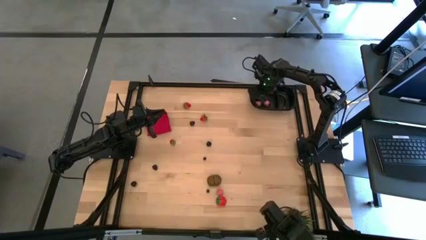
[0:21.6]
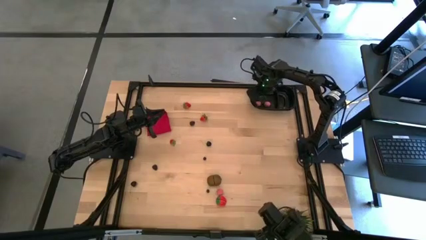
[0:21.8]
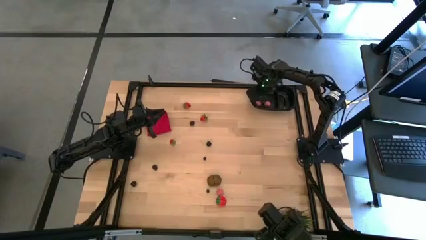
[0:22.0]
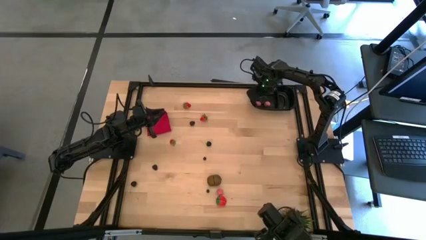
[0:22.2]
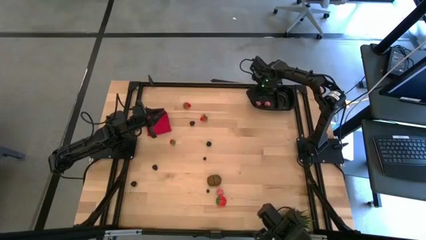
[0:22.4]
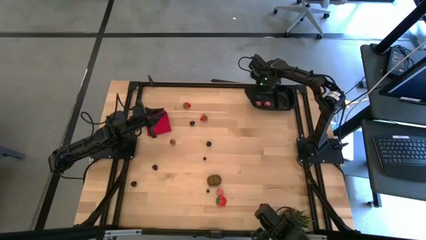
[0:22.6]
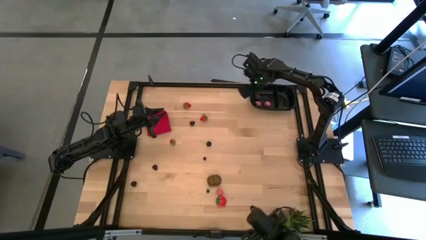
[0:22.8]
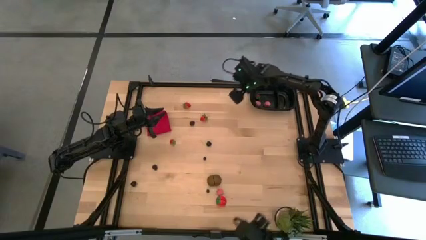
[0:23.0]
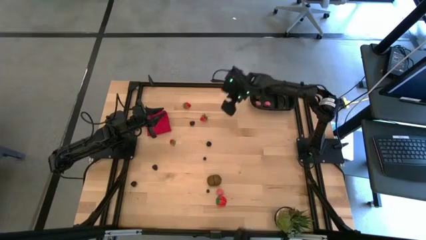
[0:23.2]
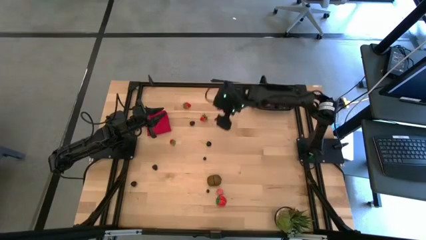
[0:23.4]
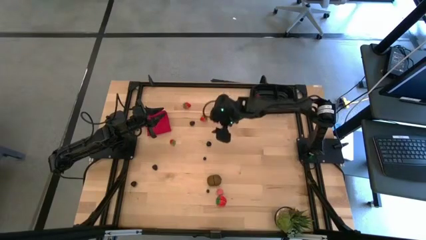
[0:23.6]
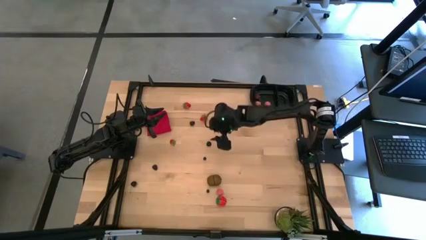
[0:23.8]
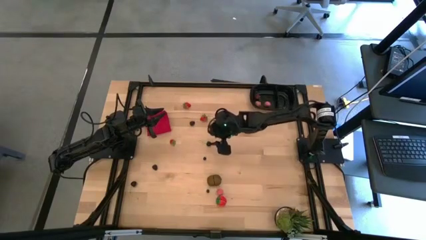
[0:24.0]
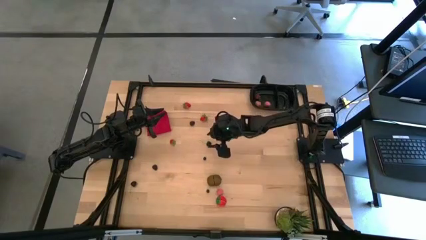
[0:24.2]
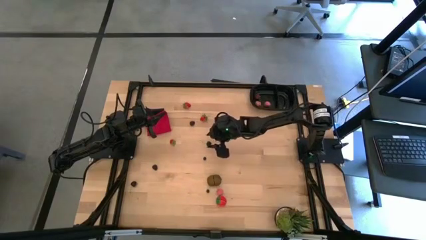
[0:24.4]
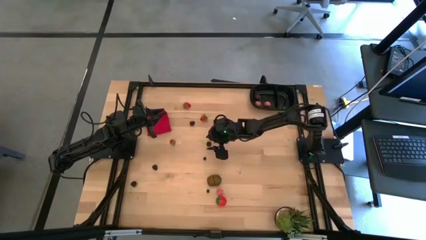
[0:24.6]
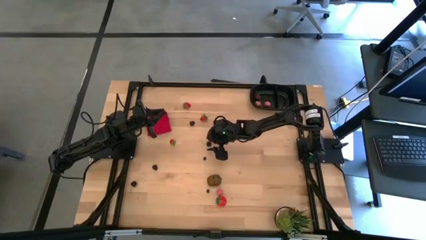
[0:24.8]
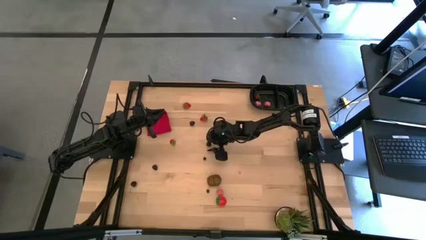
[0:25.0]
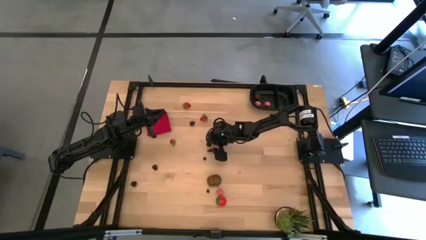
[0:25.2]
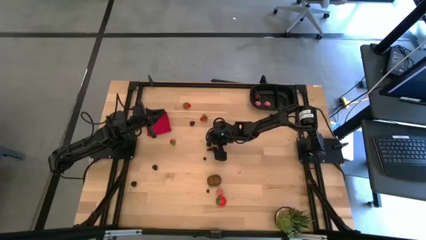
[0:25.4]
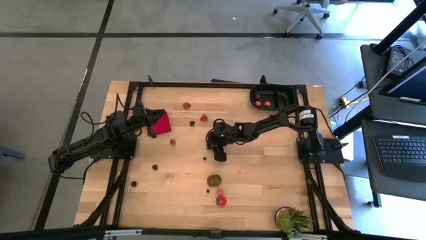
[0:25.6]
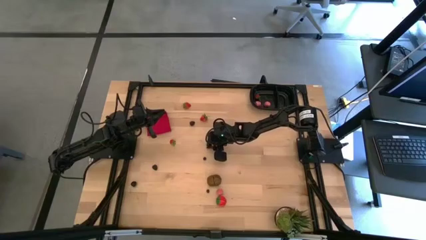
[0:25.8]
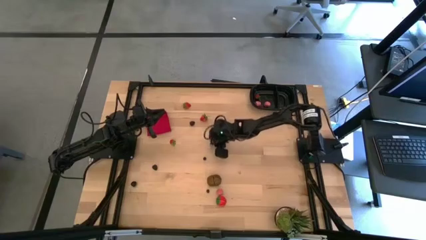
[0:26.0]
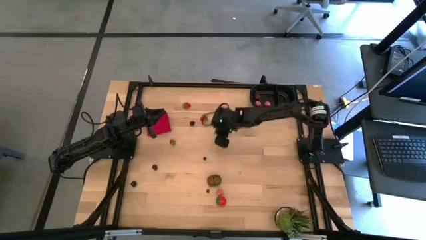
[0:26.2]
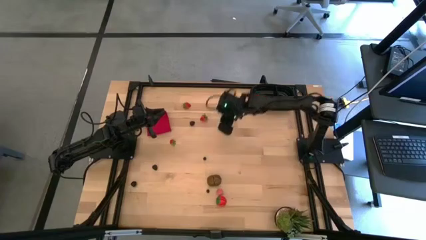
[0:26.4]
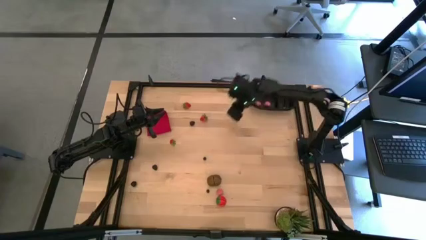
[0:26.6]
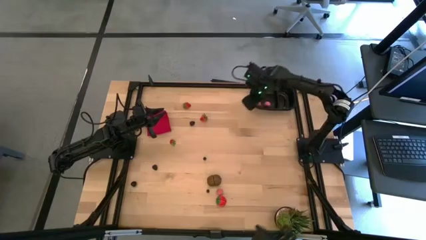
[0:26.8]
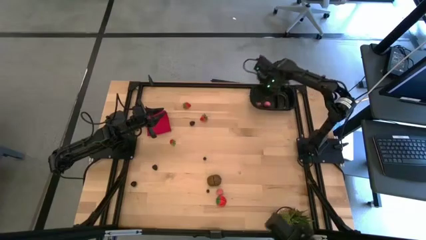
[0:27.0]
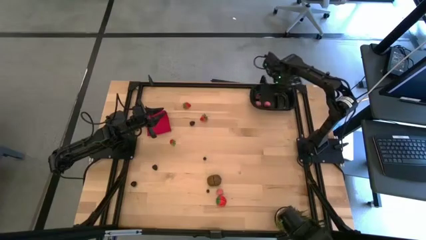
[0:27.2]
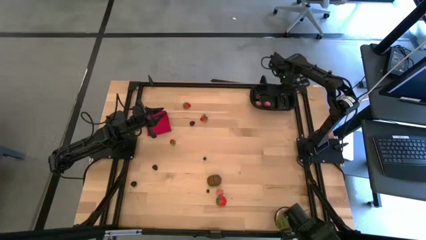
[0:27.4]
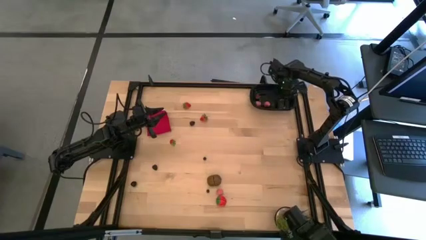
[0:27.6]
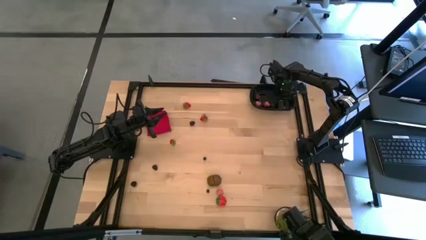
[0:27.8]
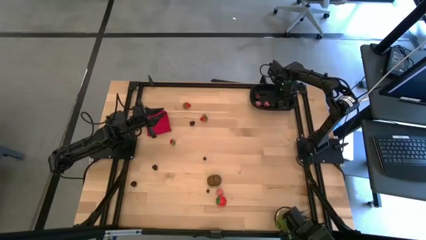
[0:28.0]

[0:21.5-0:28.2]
Task: Pick and placing Produce into tupperware
Put the black cherry into the black bin

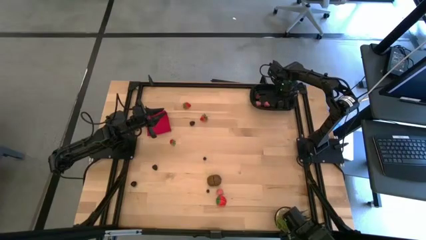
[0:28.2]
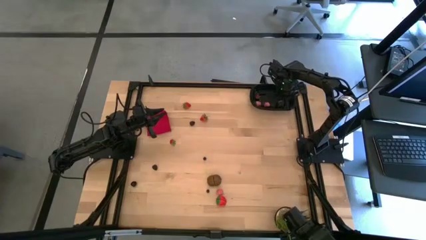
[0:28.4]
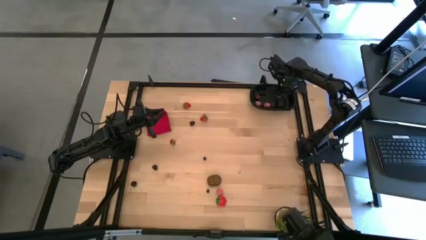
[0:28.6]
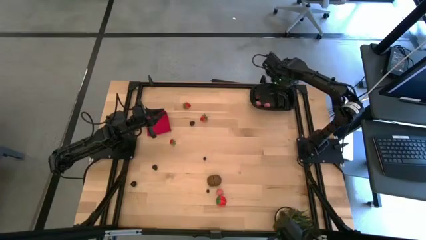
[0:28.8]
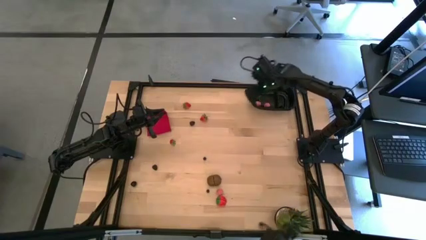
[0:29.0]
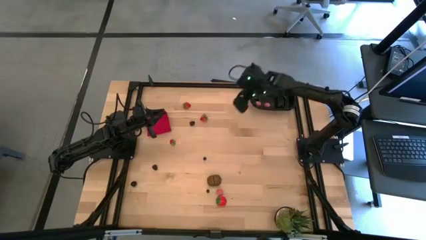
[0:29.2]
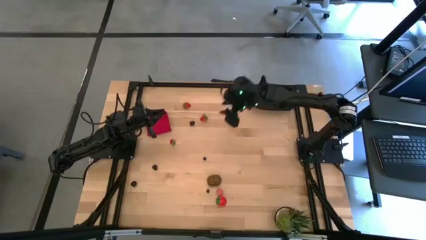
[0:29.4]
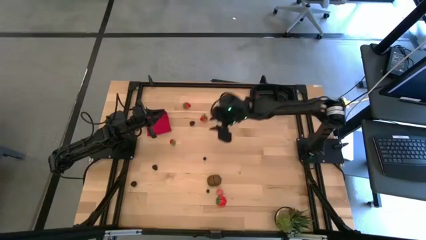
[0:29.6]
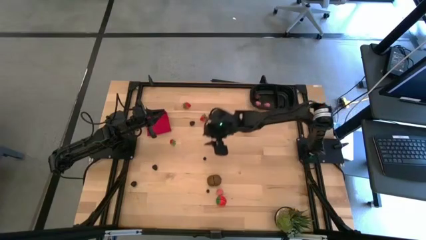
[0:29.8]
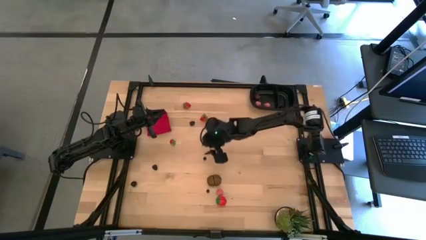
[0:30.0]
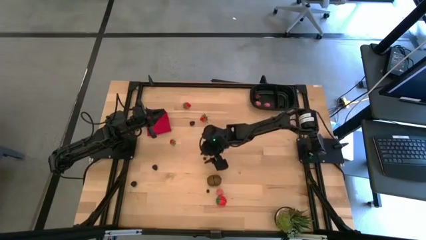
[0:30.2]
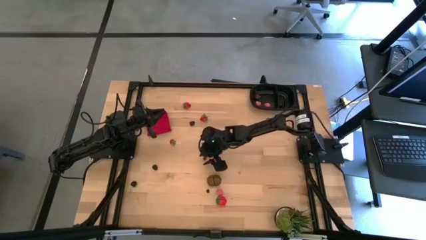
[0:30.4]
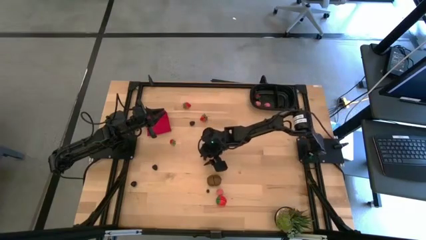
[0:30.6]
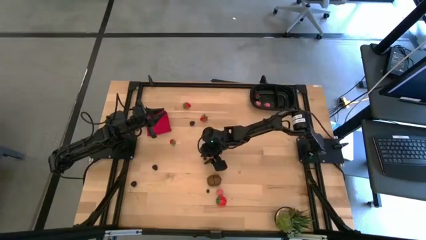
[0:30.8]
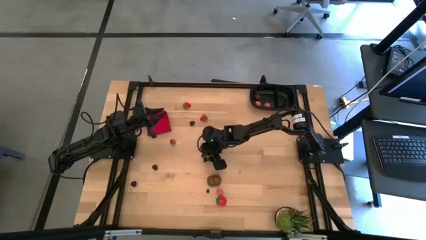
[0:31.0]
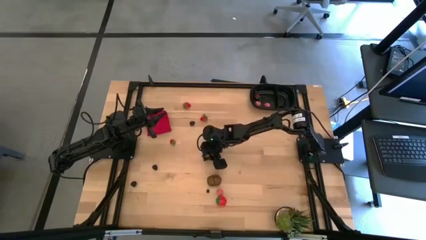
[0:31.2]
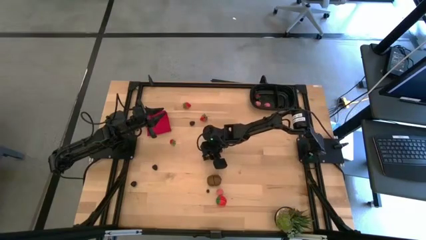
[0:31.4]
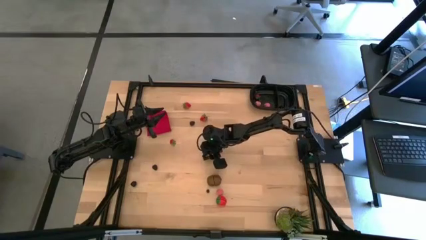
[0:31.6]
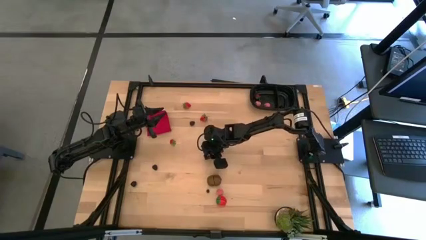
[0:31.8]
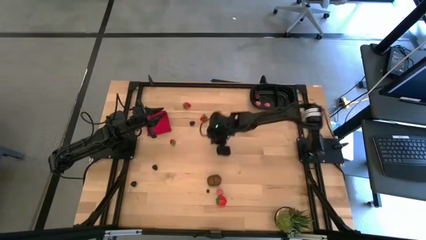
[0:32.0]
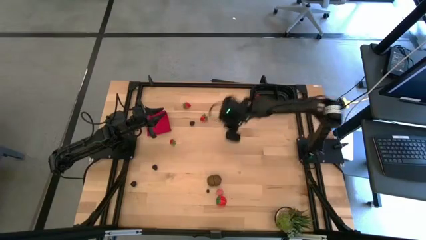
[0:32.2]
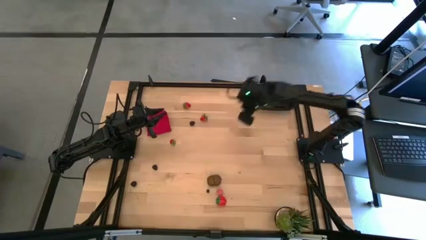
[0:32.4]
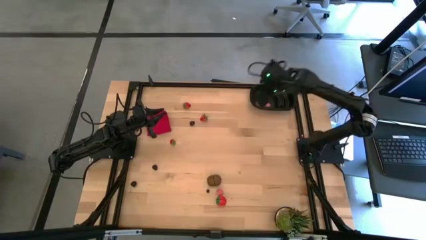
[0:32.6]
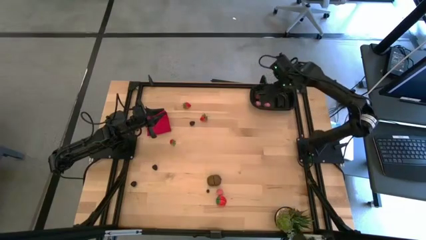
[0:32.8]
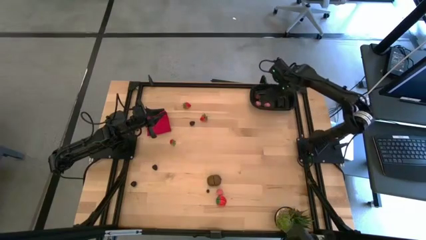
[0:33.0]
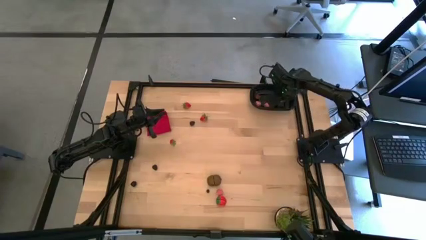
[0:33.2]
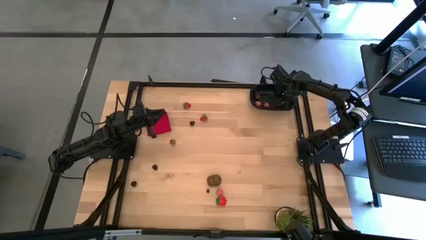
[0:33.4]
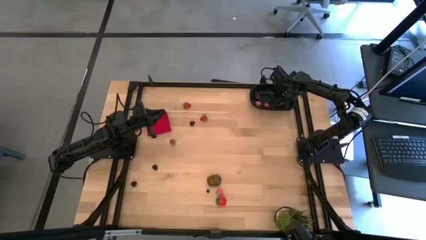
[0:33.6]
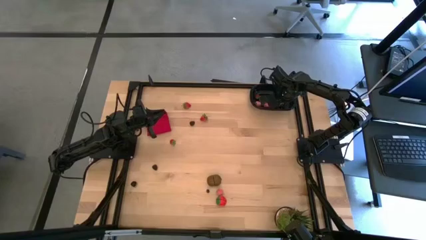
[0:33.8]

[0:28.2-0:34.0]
Put the black berry into the black bin

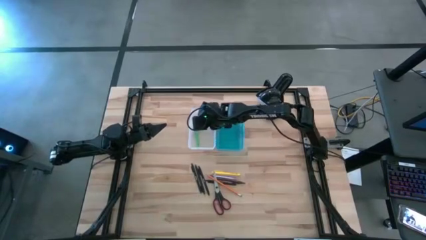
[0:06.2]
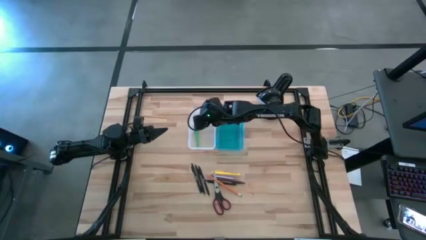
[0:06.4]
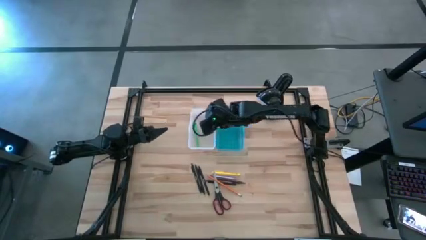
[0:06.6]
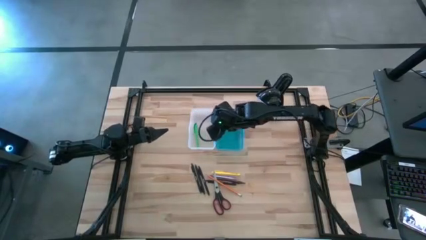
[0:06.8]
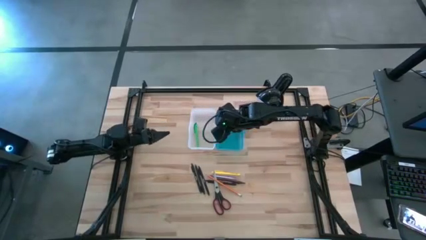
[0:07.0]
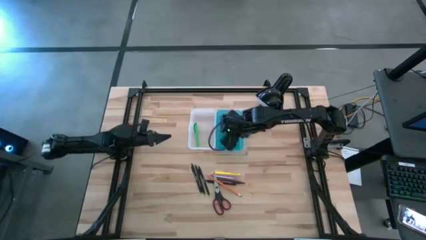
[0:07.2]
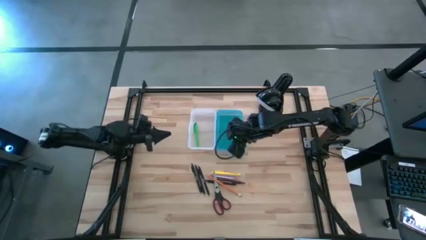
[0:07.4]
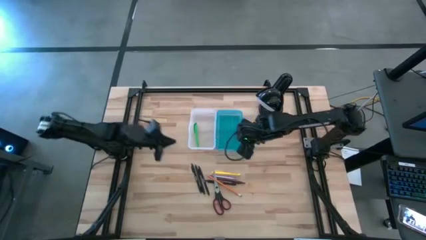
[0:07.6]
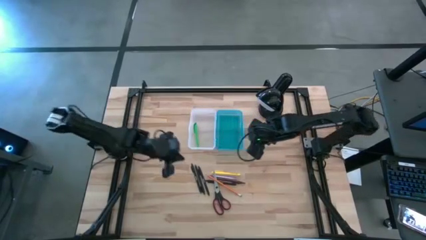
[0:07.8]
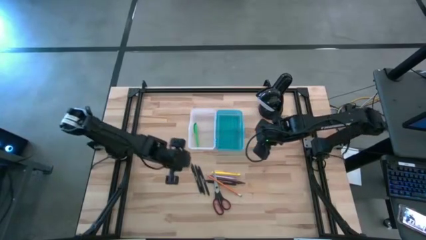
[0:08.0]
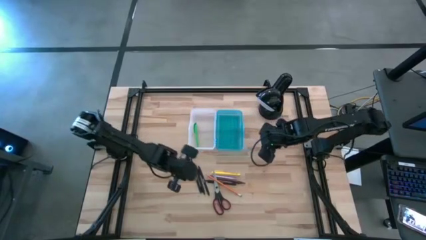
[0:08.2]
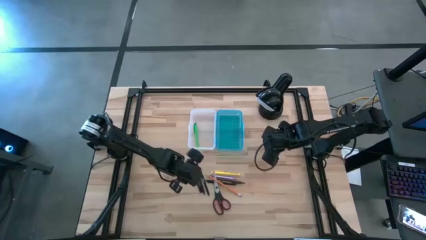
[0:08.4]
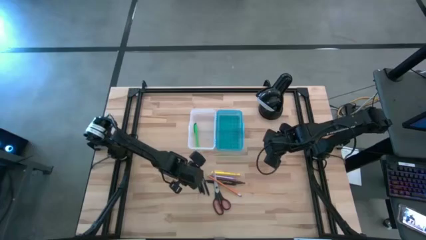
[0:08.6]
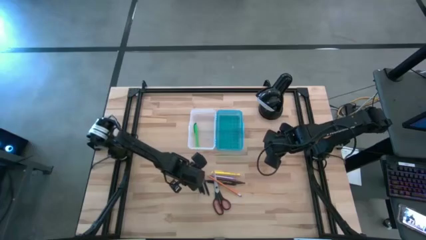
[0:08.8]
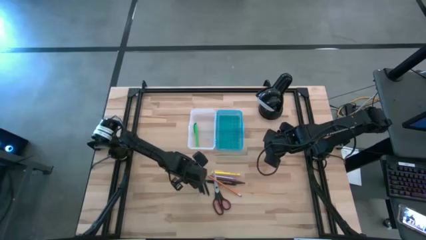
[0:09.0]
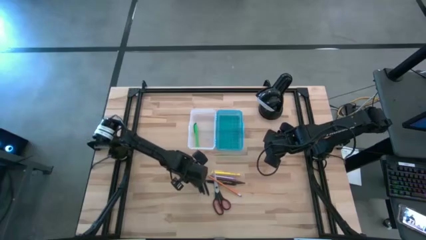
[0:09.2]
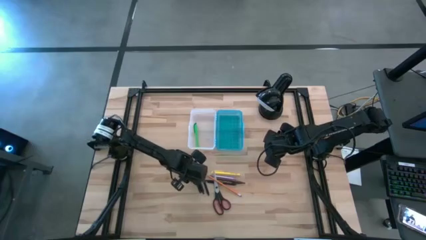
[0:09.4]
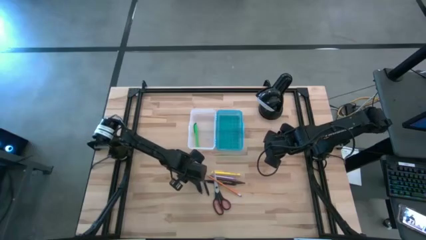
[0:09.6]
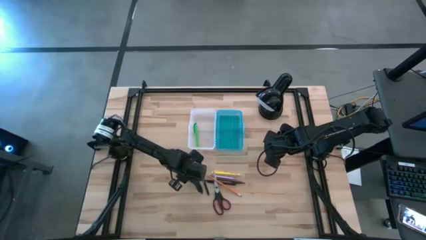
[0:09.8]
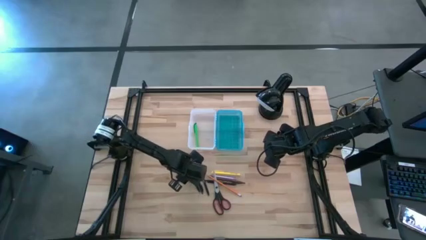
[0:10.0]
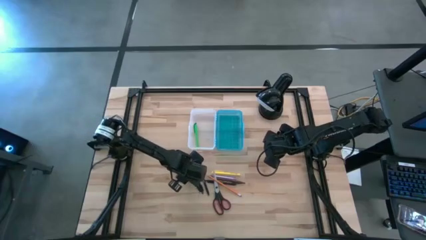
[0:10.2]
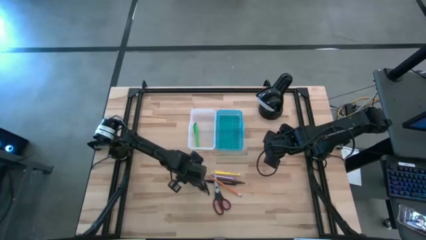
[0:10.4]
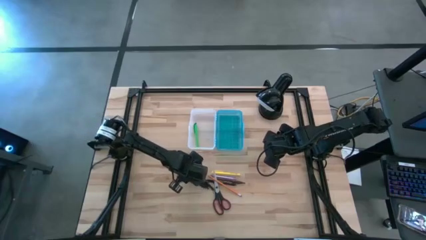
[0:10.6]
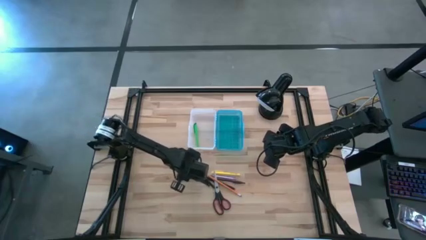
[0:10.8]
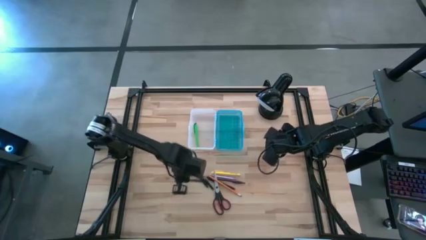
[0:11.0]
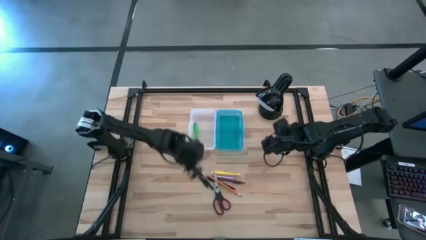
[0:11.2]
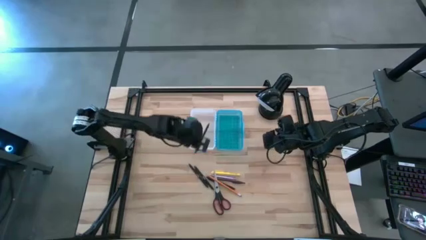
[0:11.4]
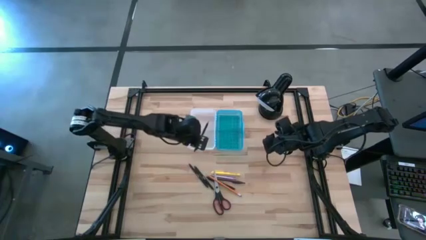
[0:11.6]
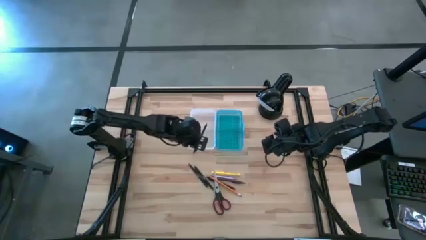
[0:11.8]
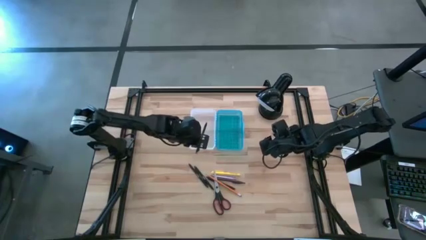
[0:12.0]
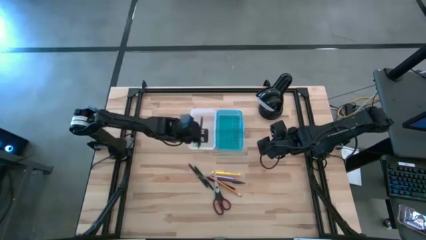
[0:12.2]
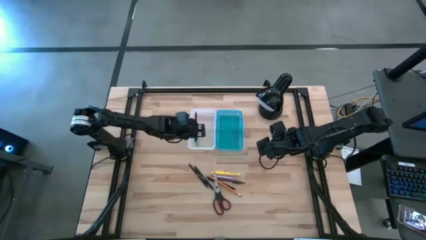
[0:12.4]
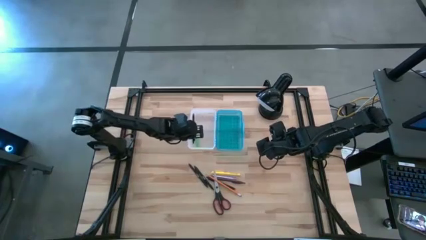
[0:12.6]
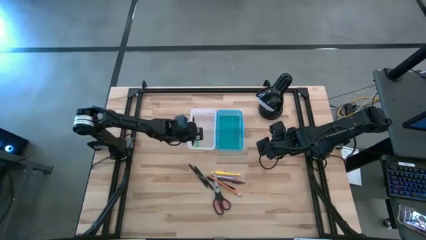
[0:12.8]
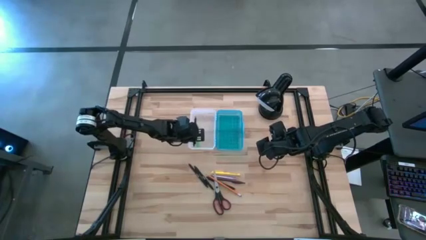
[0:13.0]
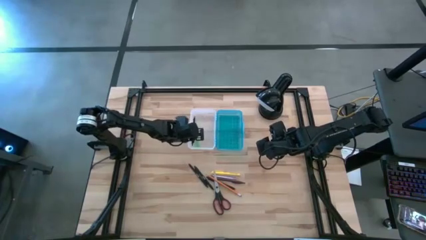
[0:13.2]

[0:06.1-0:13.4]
Task: Pick & place school supplies into a supply box
Put the black pen into the blue supply box
